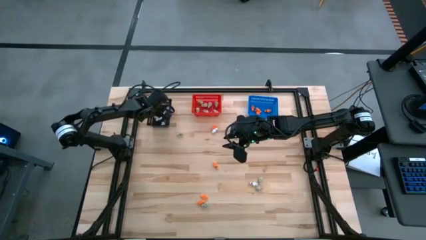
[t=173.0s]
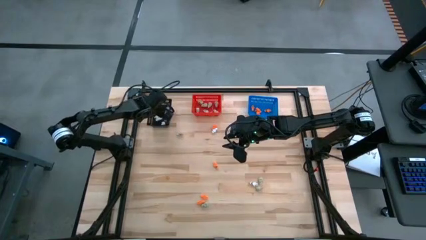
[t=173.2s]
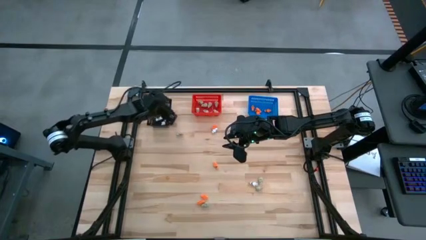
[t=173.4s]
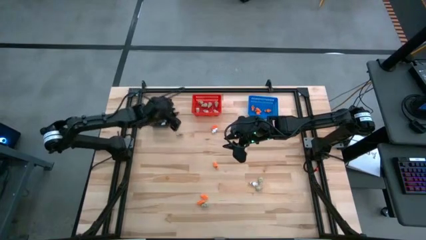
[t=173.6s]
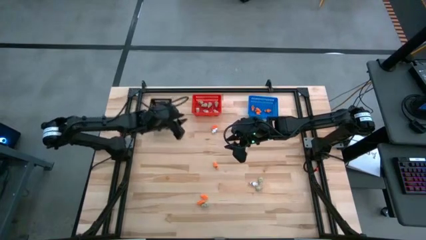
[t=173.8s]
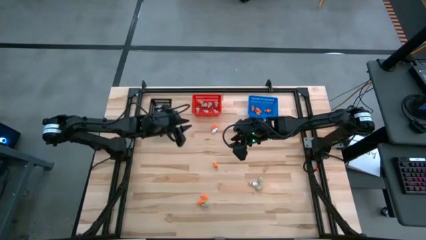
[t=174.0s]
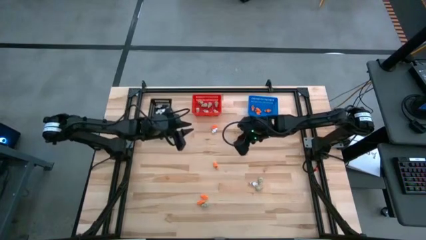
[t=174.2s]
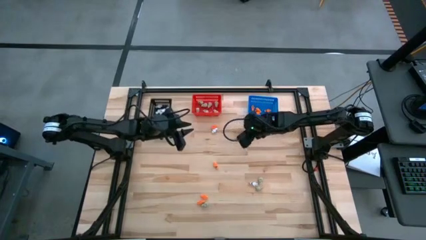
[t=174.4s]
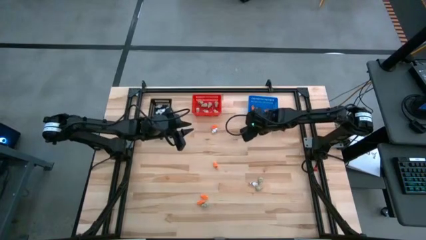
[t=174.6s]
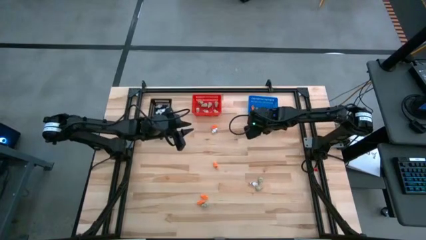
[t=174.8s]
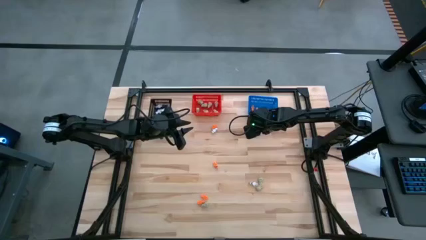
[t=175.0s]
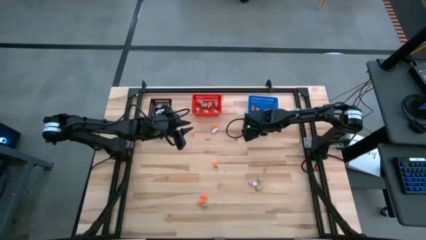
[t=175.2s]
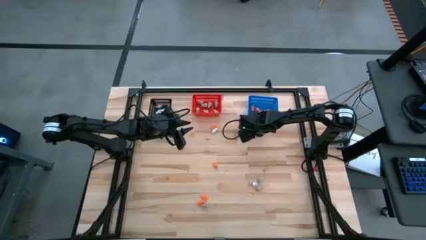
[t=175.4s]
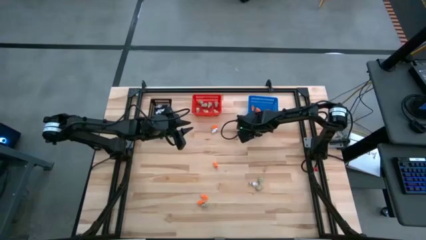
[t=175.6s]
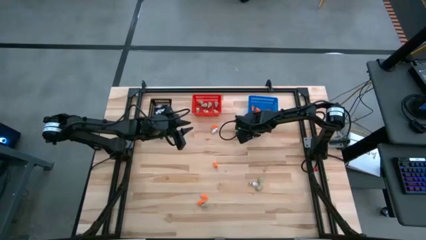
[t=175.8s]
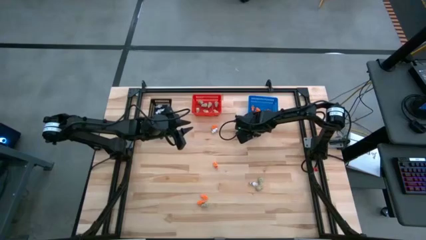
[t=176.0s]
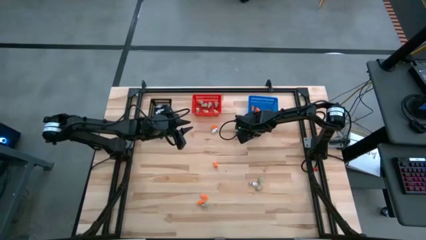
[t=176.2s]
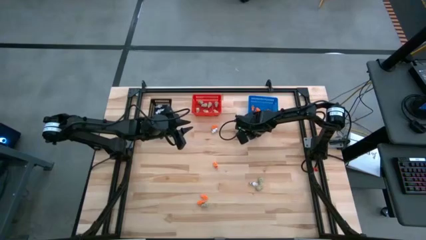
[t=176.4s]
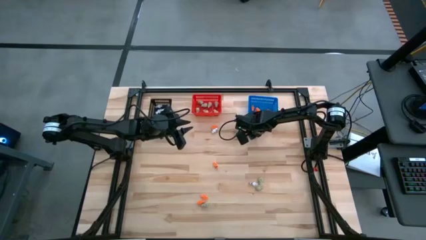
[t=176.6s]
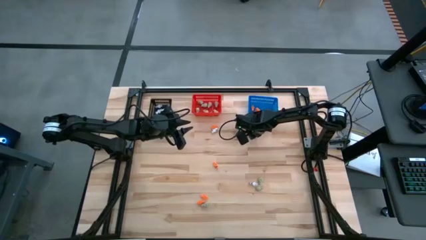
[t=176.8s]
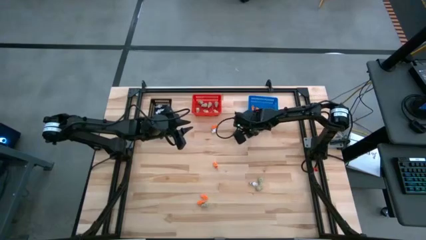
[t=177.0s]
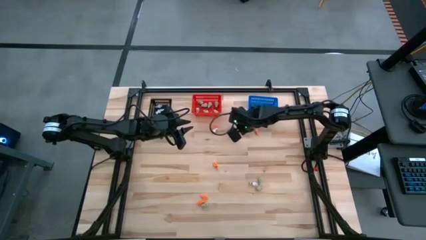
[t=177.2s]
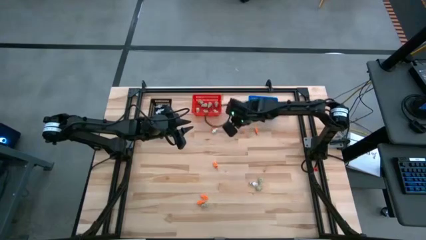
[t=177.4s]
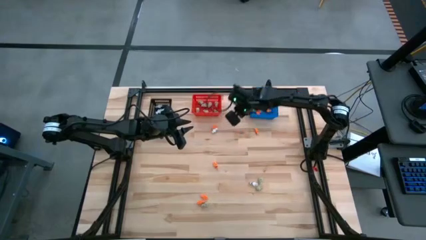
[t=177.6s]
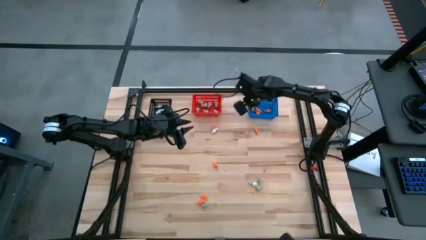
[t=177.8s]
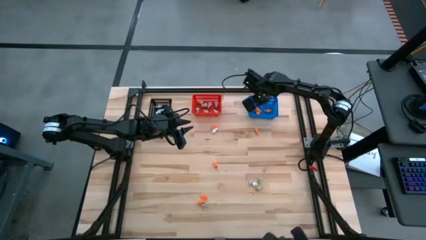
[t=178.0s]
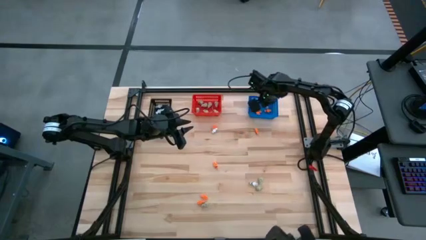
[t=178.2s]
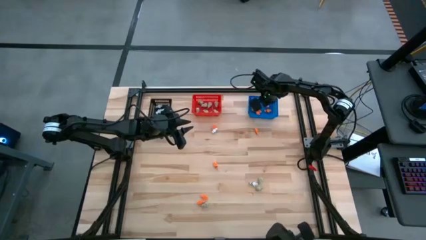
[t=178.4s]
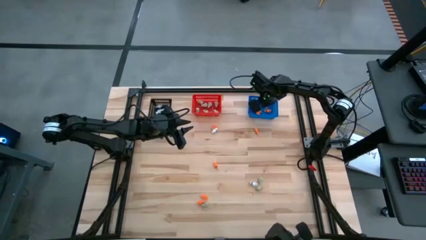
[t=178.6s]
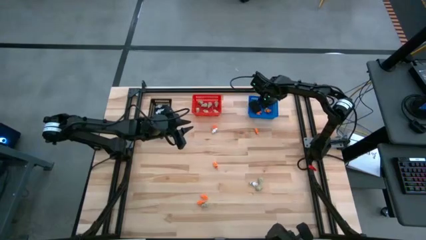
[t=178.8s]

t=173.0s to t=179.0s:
Task: Sort Halloween decoration
Put the orange skeleton toy into the blue bin

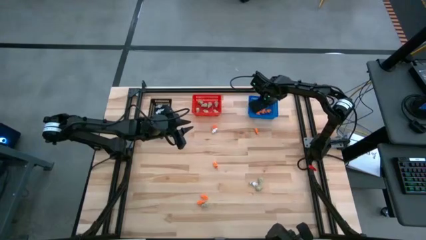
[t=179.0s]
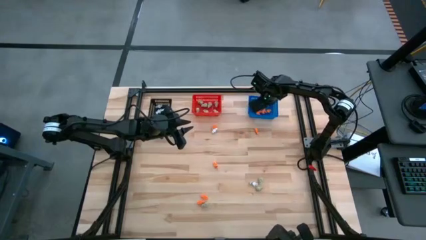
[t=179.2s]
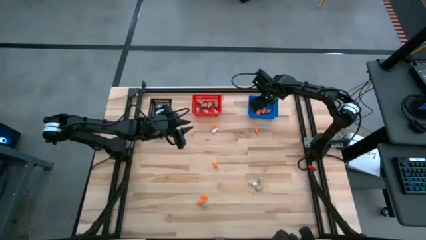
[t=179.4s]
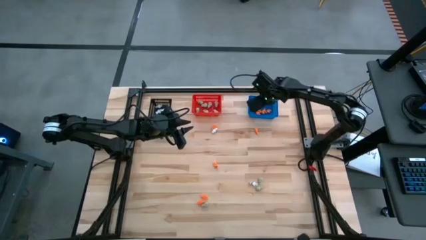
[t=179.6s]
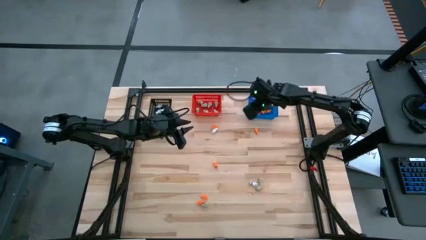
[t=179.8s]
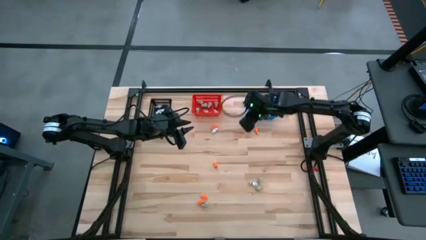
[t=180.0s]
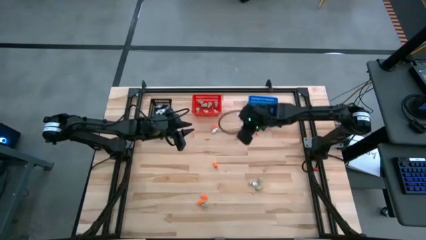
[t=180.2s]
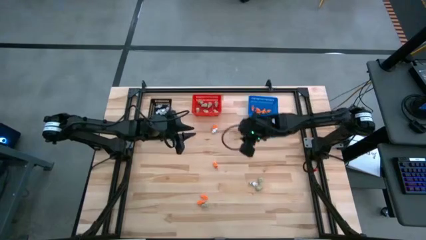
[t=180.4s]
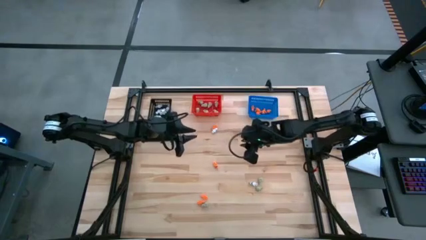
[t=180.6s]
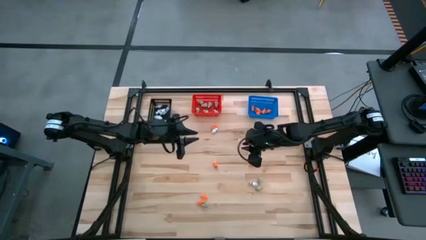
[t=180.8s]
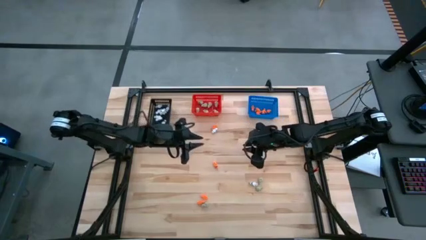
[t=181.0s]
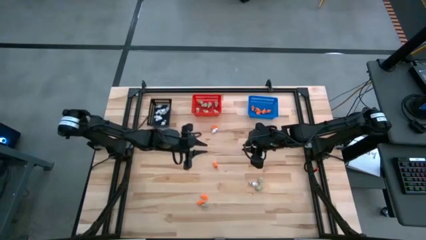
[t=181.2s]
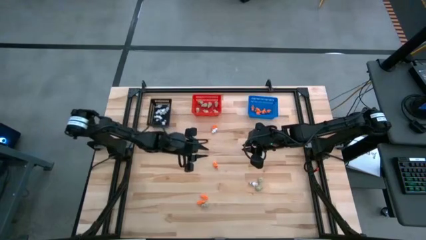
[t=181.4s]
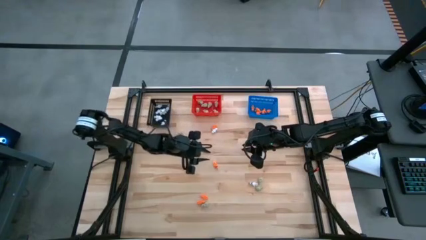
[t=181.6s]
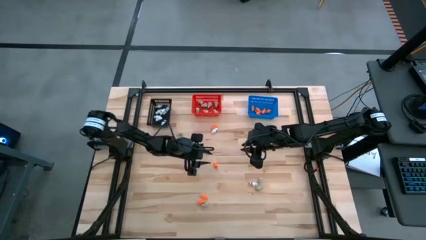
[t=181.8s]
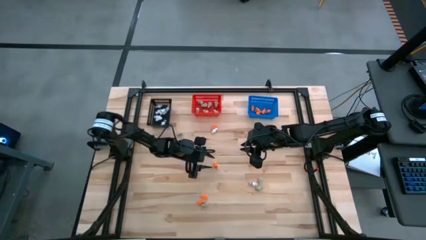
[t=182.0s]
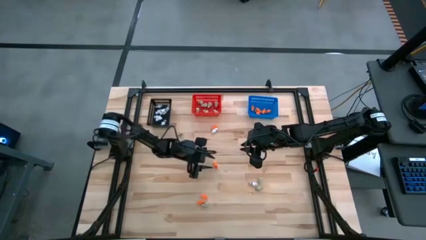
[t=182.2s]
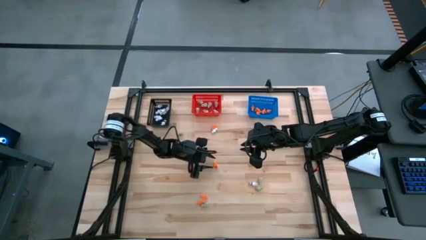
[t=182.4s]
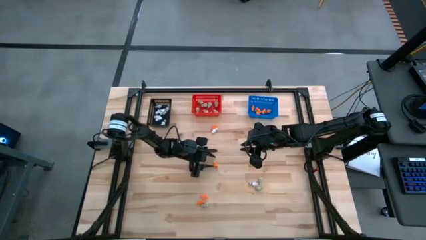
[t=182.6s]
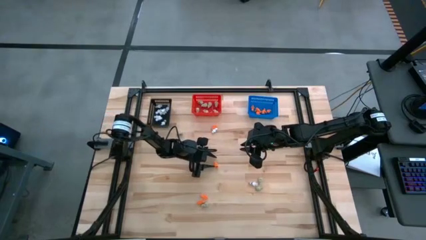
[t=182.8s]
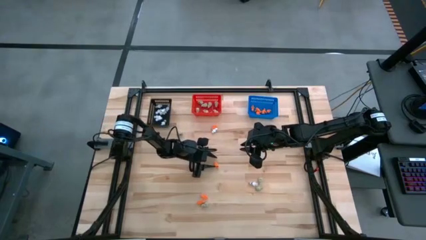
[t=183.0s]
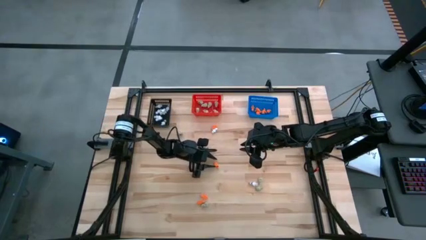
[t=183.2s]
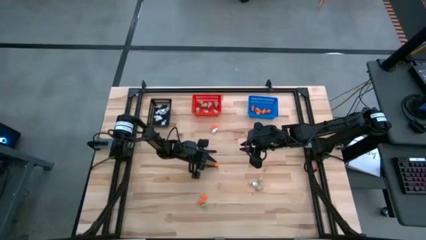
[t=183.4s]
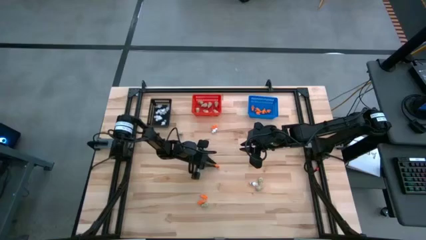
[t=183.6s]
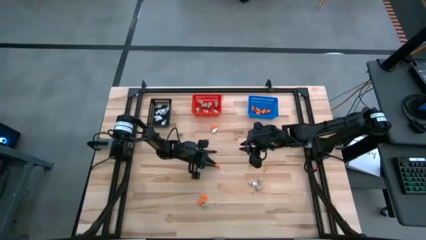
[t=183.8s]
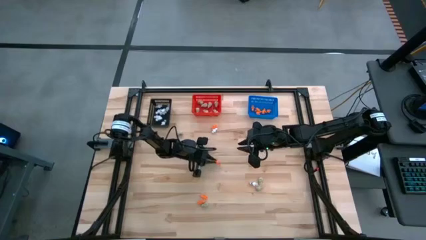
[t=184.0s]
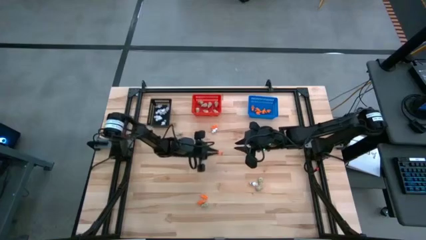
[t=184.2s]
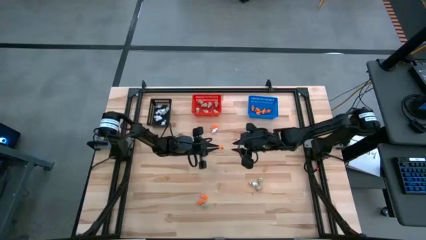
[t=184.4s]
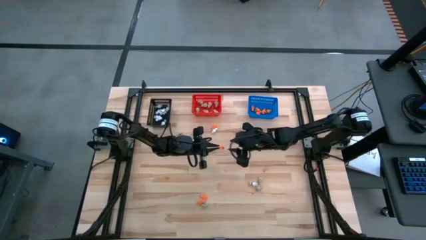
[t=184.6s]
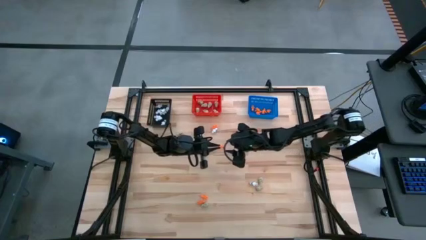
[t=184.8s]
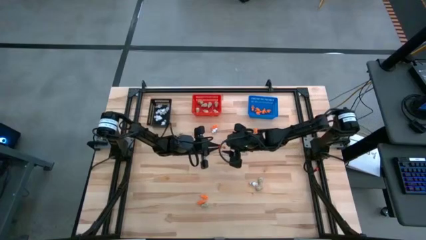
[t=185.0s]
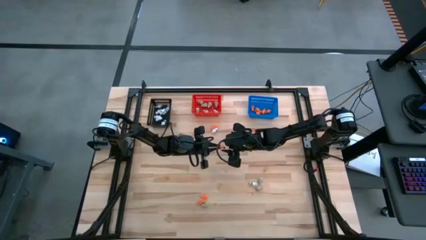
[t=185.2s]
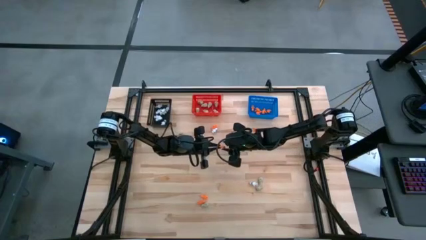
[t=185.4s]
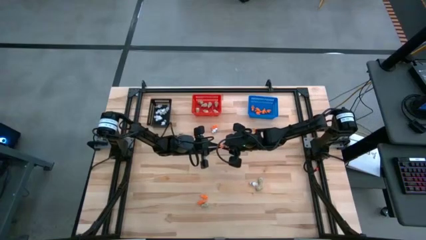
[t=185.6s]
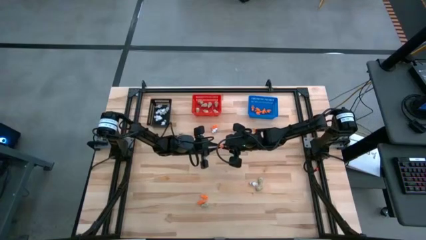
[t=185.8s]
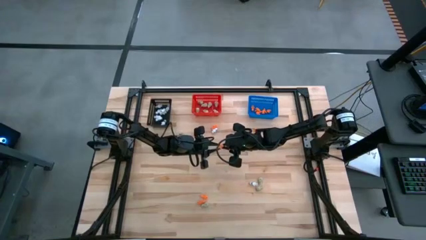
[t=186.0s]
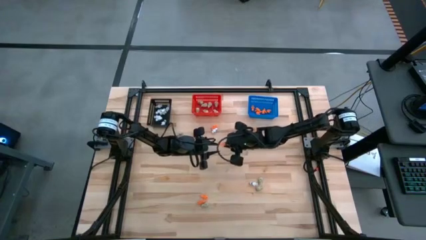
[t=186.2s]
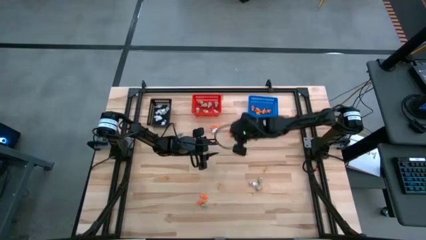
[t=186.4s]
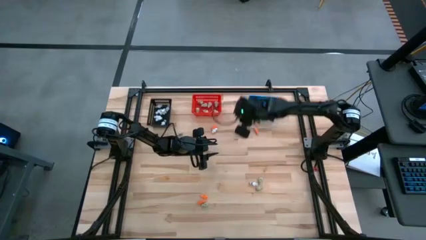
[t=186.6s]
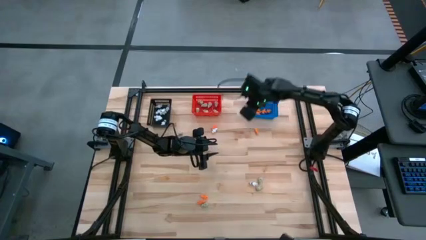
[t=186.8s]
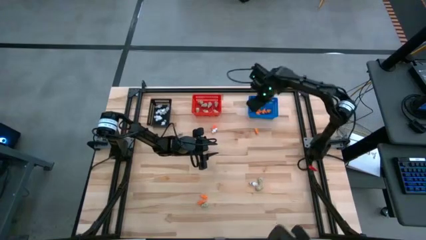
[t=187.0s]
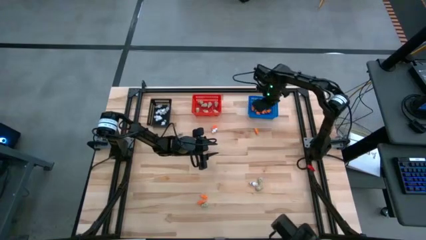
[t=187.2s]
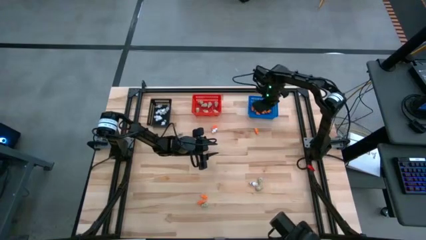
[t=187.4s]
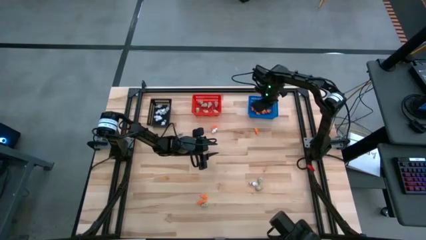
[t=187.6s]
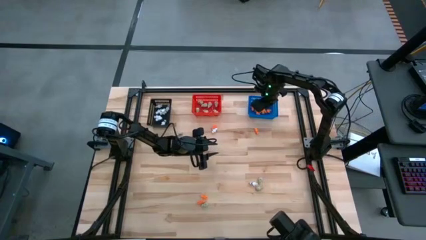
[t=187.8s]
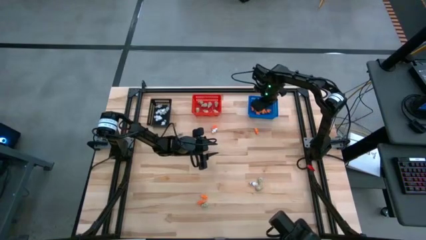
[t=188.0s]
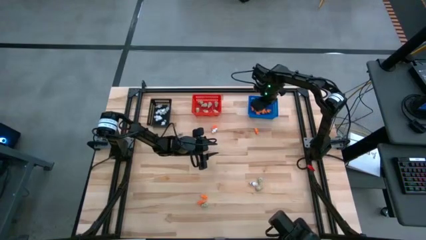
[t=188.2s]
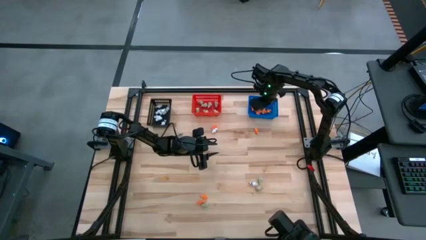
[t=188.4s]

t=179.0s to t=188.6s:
Put the orange skeleton toy into the blue bin
